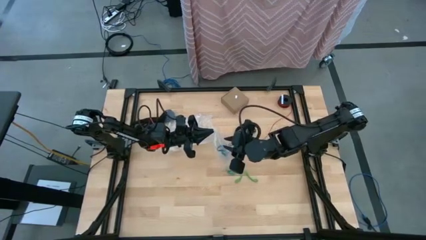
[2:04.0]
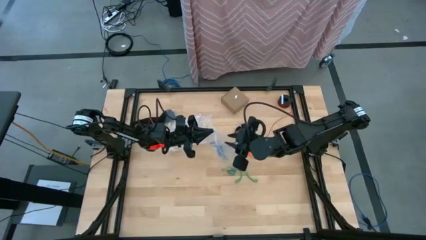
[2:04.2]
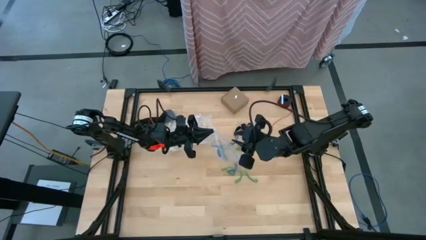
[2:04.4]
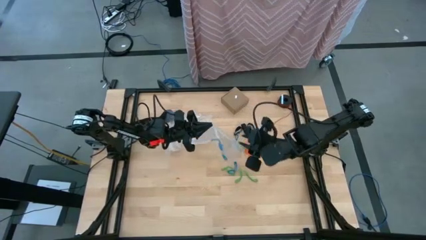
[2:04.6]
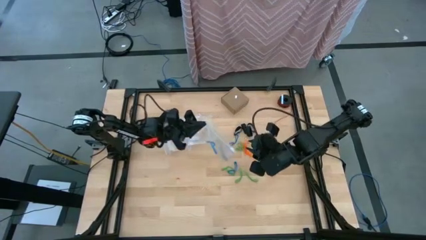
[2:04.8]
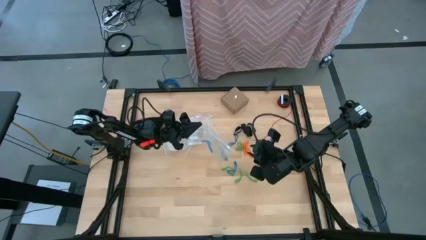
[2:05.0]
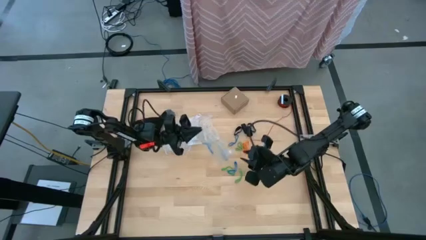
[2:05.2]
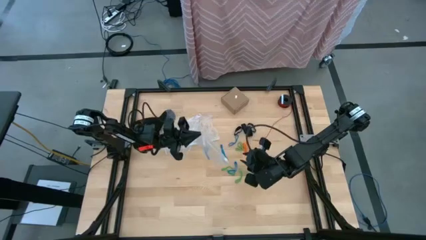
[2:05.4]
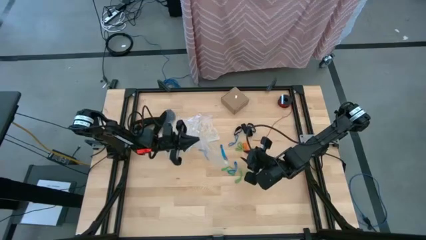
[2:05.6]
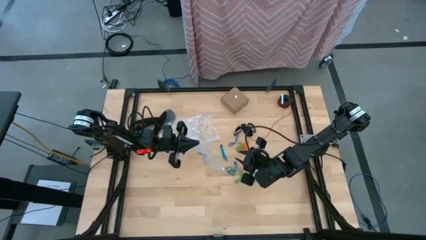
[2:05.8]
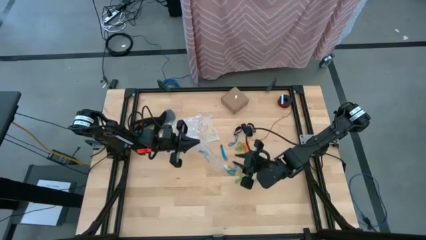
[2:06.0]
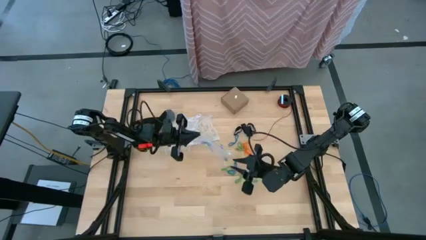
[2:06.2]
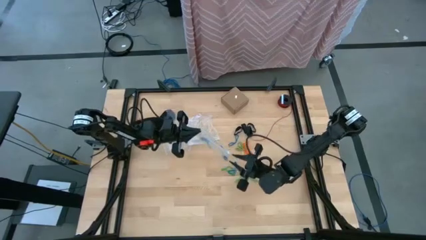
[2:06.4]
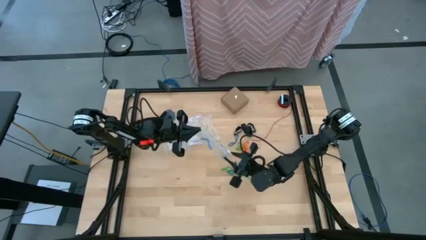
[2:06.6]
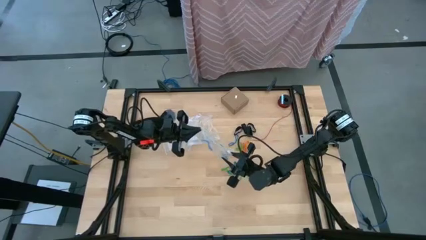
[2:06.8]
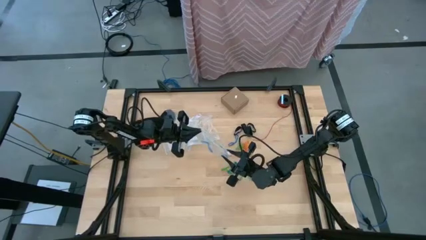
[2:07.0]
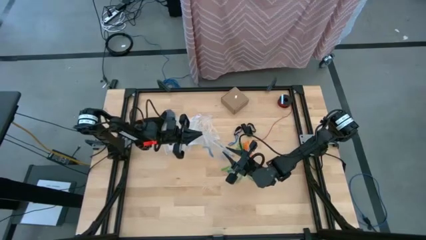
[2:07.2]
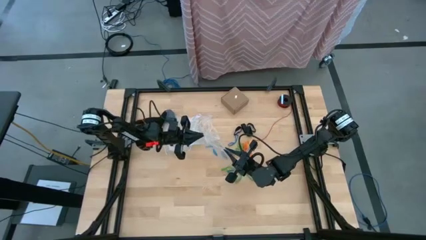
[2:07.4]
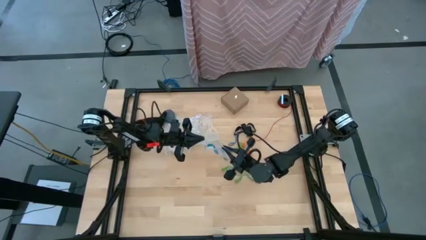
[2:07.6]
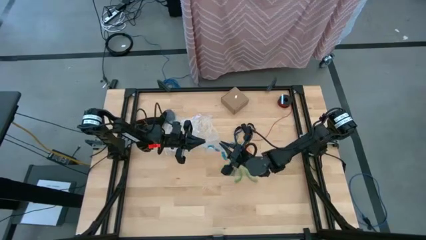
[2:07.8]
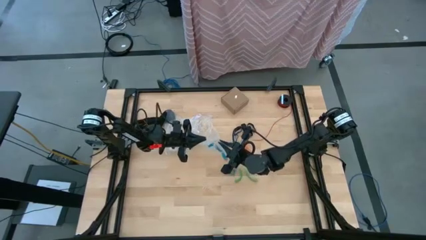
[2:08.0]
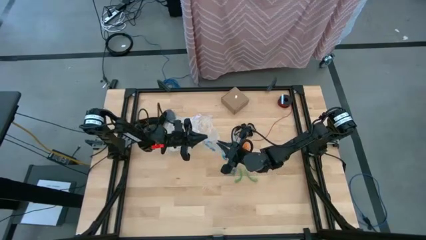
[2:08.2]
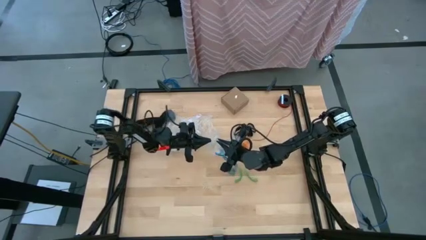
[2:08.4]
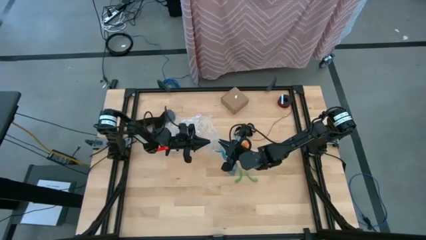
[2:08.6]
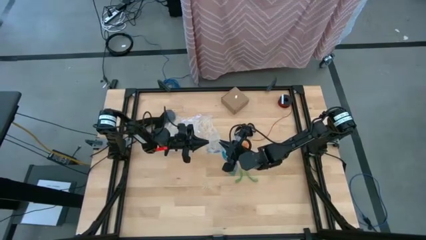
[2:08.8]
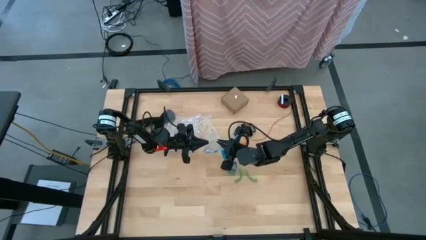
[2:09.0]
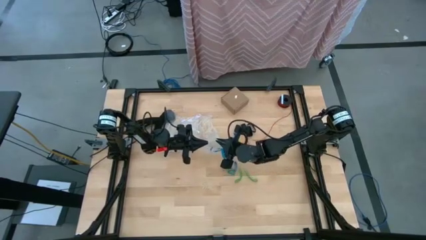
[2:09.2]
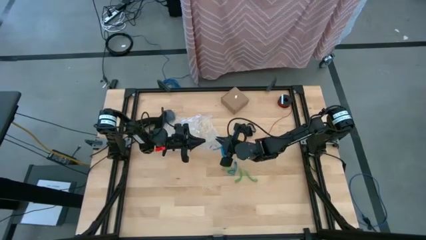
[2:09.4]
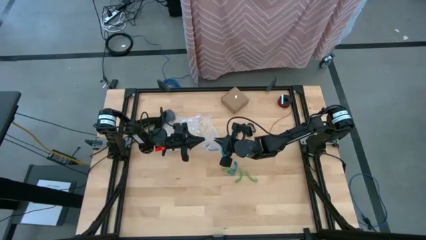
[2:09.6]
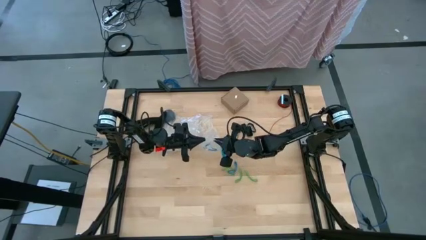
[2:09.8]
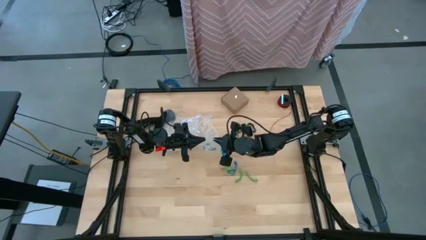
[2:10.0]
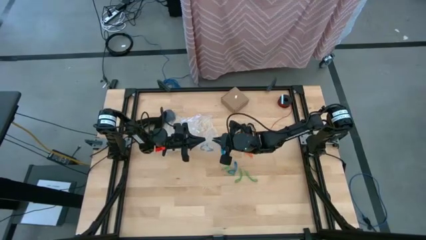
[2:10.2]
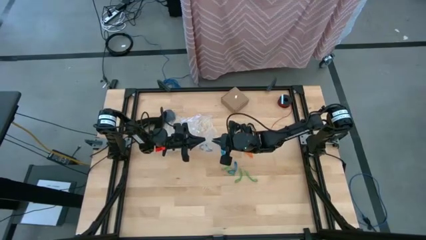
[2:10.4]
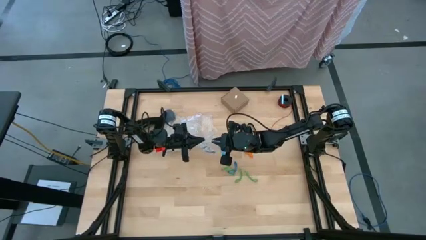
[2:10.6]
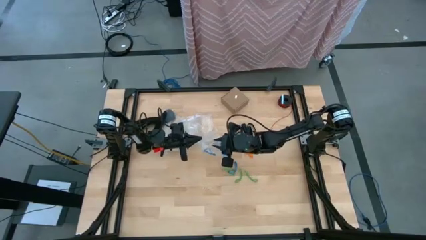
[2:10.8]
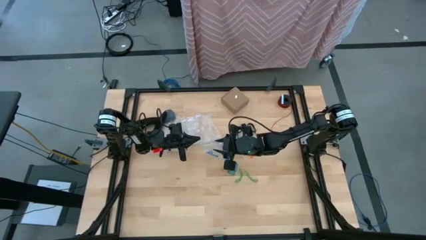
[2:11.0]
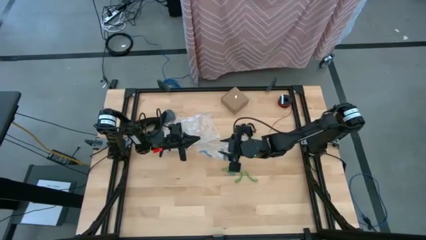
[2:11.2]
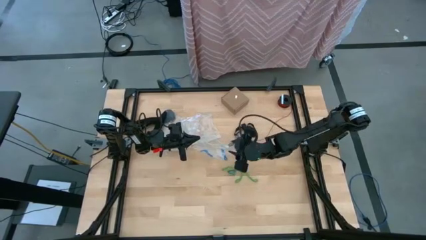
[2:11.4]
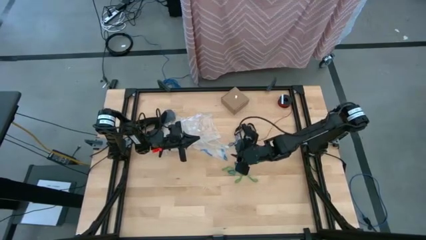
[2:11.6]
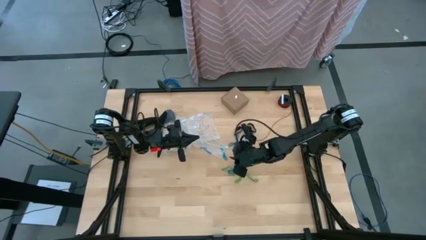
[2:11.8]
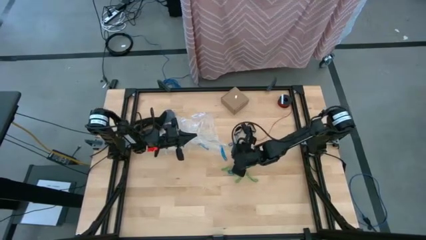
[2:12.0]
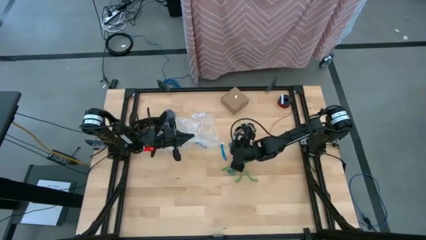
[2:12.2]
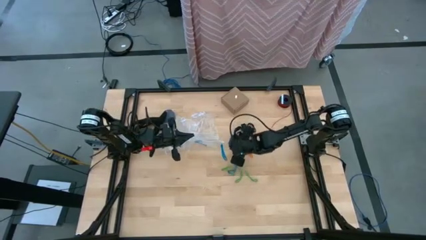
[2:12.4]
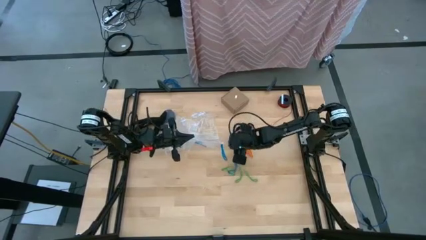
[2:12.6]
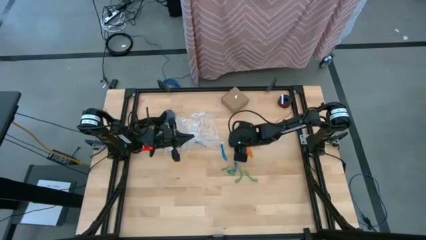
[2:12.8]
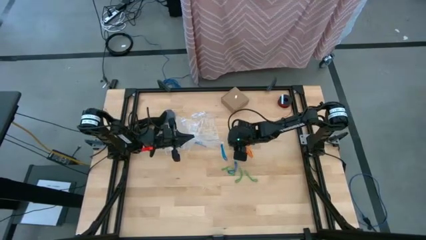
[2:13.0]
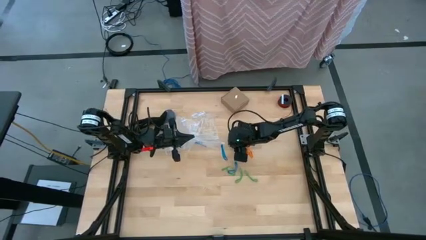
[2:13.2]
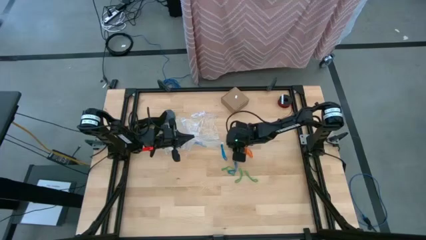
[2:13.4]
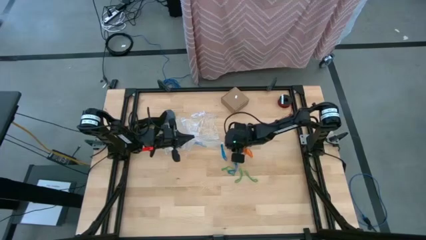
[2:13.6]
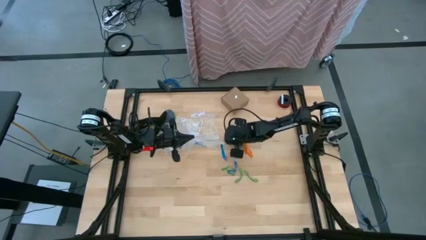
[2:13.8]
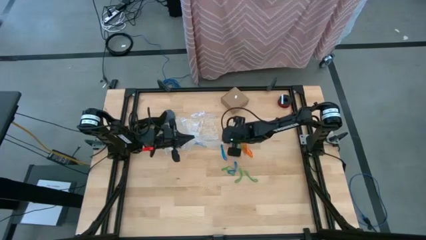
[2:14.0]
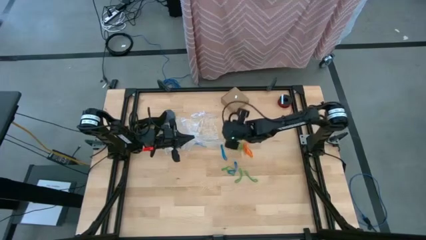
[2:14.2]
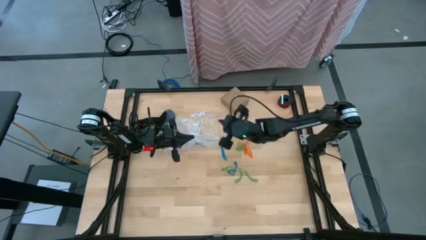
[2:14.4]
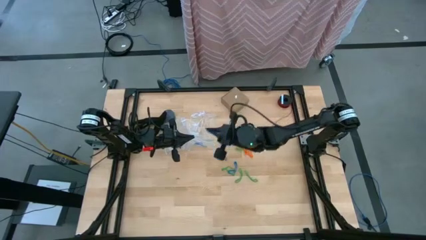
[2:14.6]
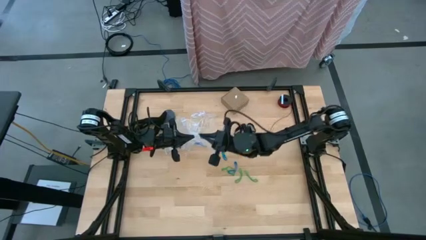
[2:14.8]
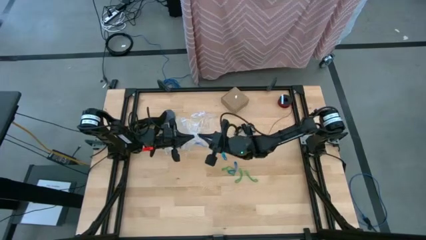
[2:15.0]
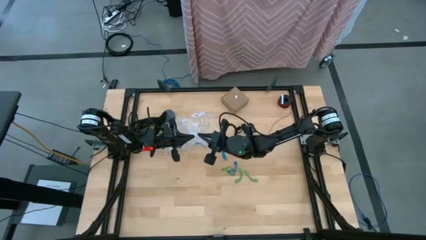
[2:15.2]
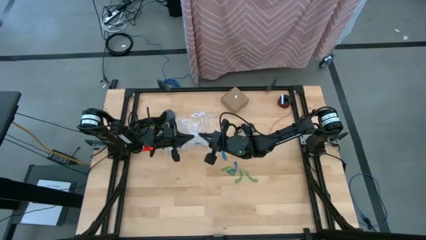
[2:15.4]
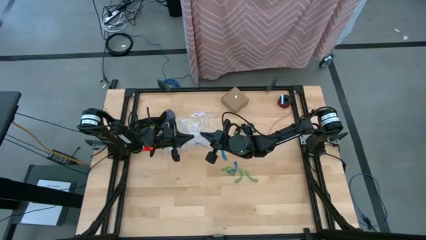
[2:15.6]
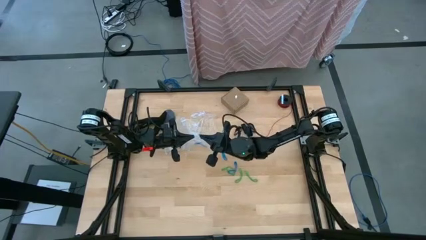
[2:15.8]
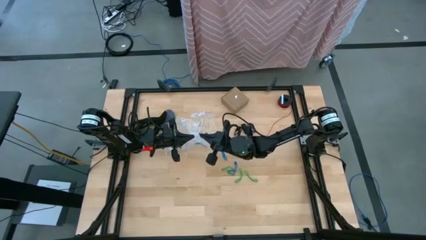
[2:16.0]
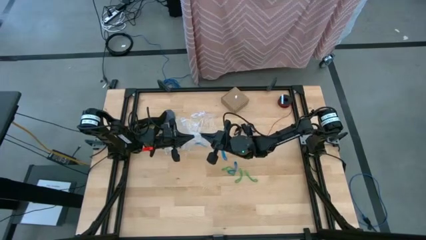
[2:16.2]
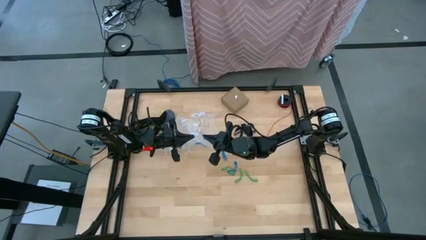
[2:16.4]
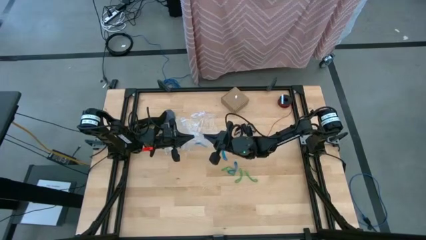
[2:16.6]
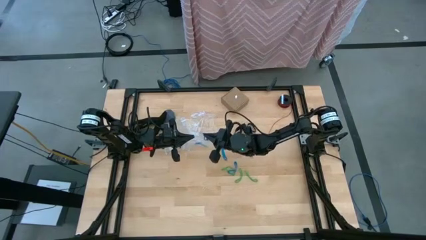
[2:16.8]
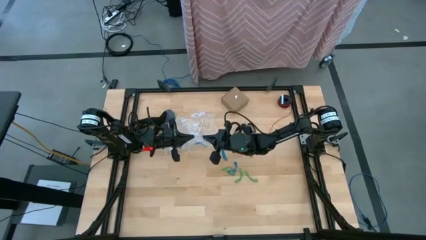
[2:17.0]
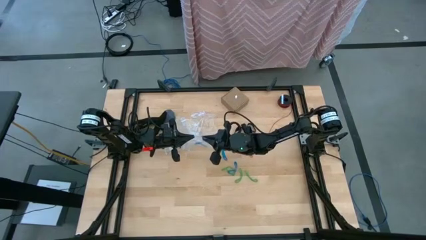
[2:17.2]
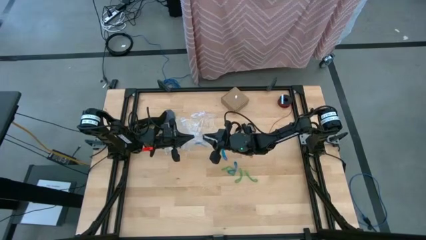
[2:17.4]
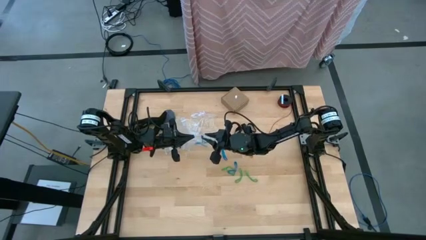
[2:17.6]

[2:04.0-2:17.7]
Task: Sort rubber bands
Put the blue rubber band into the transparent zip bag

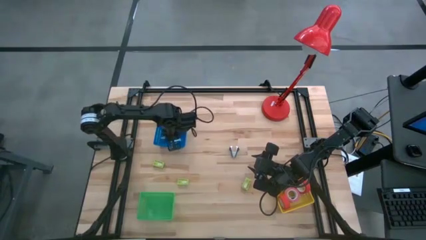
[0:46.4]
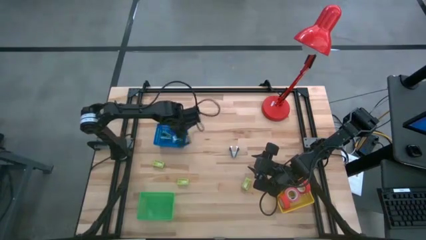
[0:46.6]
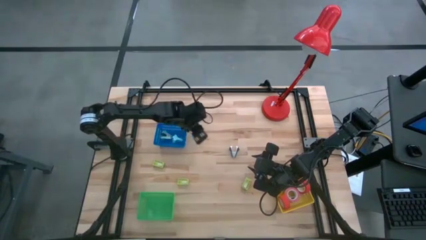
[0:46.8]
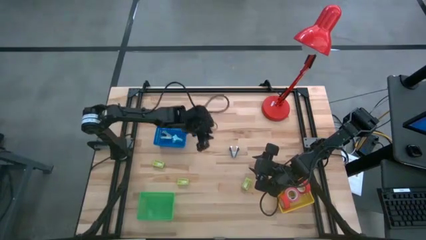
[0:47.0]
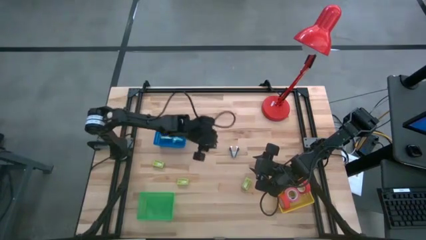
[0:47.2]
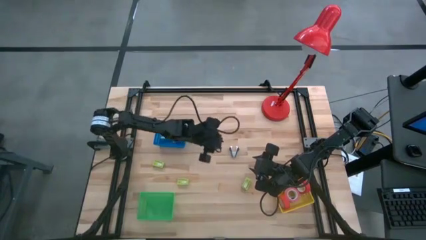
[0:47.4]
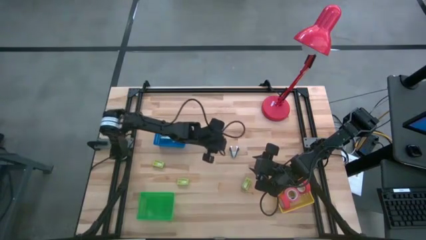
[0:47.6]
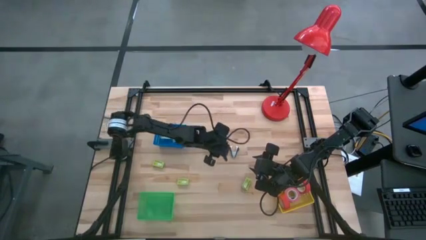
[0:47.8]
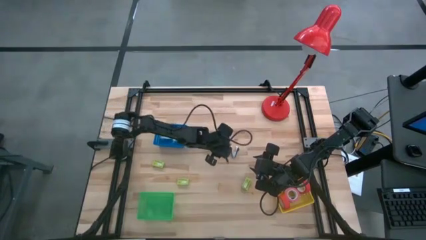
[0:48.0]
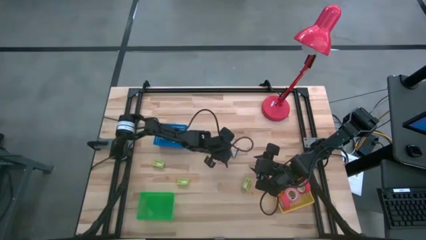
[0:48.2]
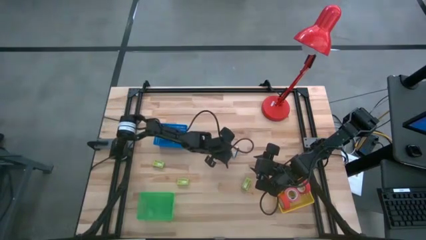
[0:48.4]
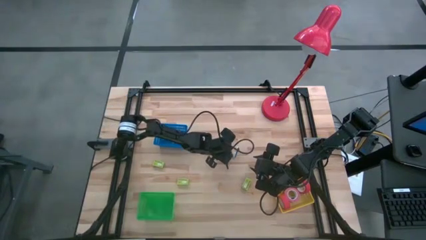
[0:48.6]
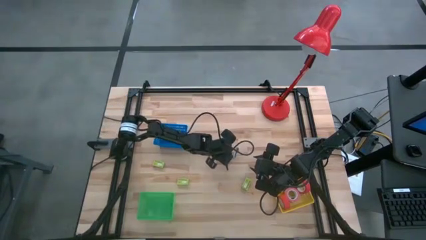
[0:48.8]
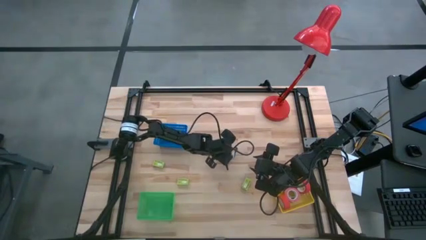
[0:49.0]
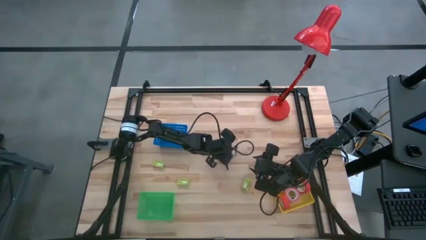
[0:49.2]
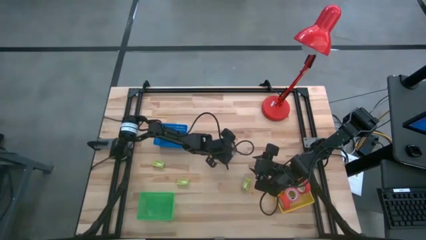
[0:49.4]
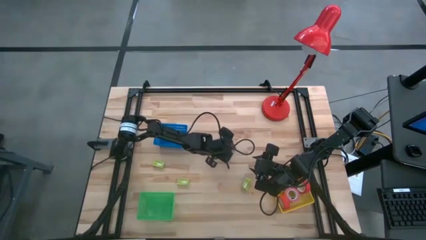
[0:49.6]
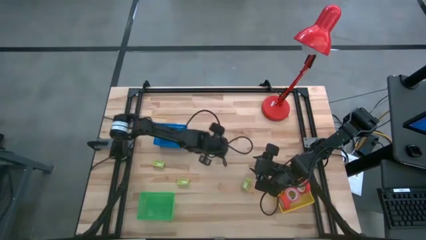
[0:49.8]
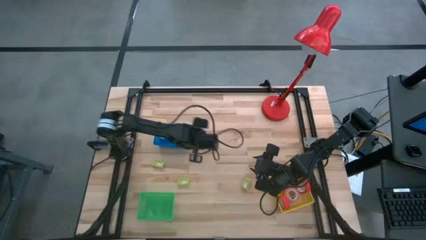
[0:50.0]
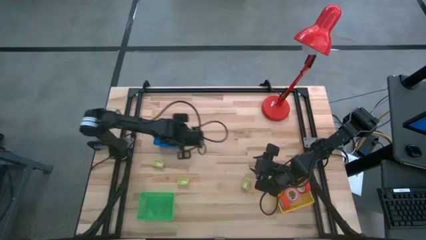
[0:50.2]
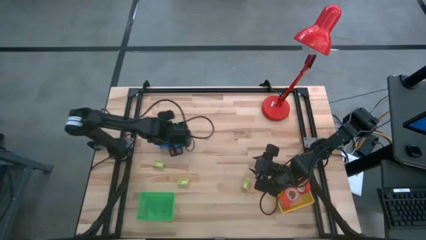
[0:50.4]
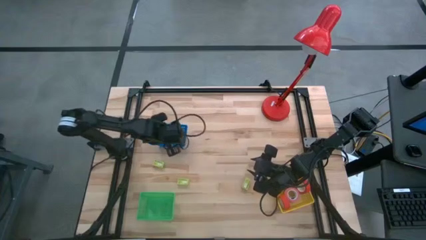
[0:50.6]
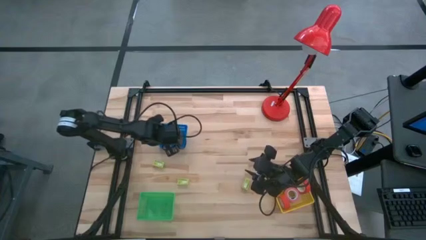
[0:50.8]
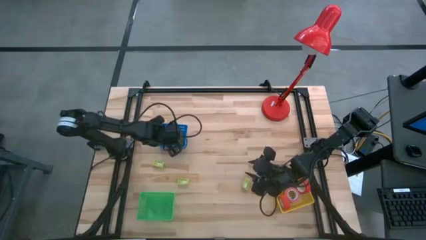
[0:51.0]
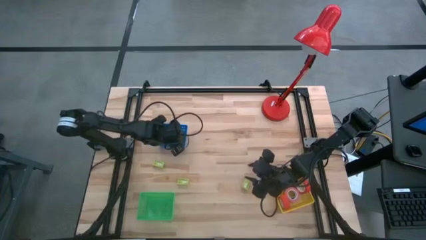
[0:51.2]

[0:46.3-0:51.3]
Task: Pick and place Stapler, Stapler remover, tape
Put the black staple remover into the blue bin
